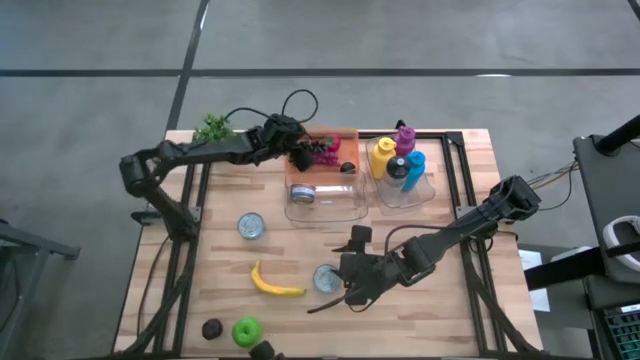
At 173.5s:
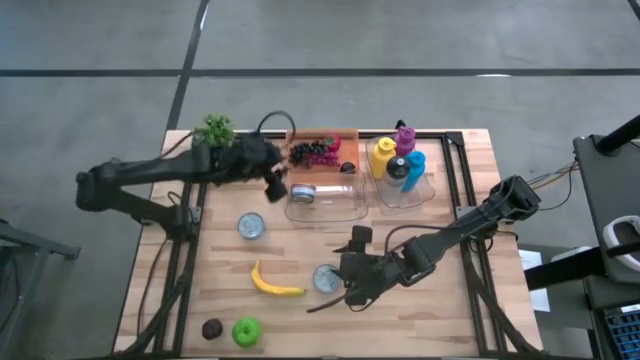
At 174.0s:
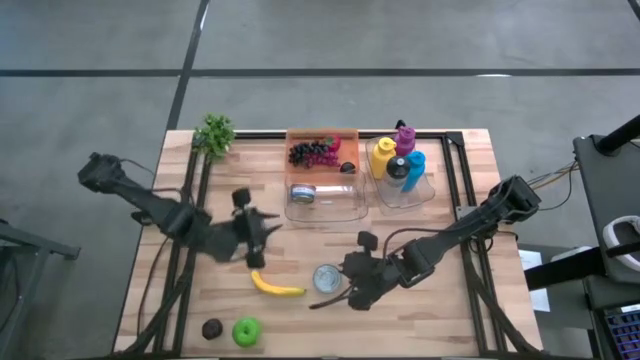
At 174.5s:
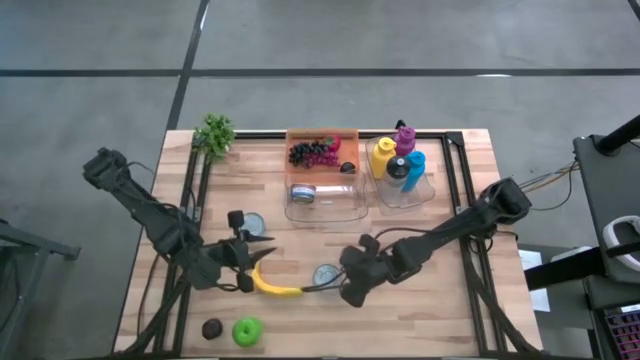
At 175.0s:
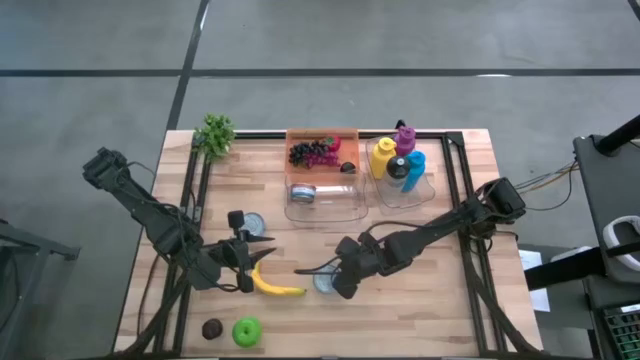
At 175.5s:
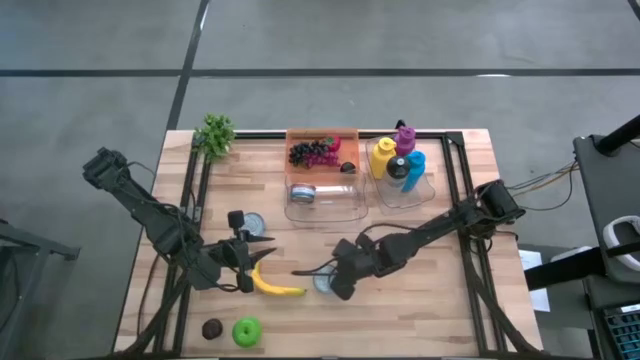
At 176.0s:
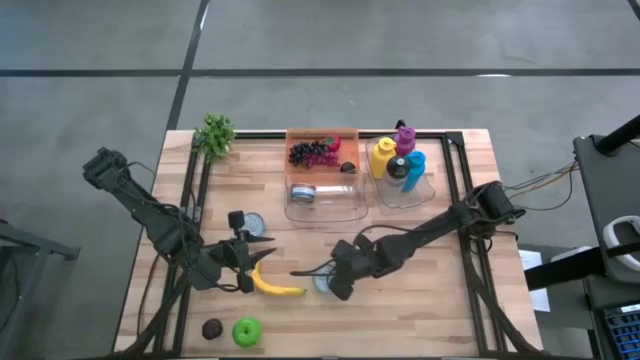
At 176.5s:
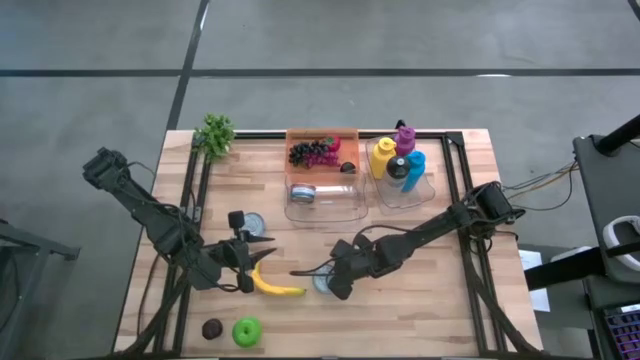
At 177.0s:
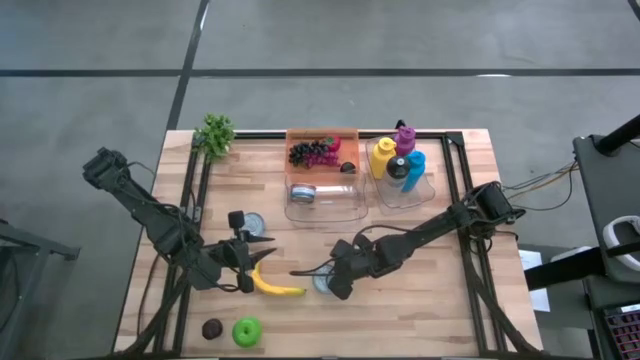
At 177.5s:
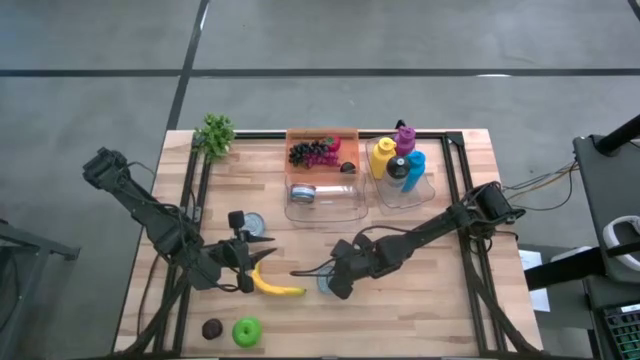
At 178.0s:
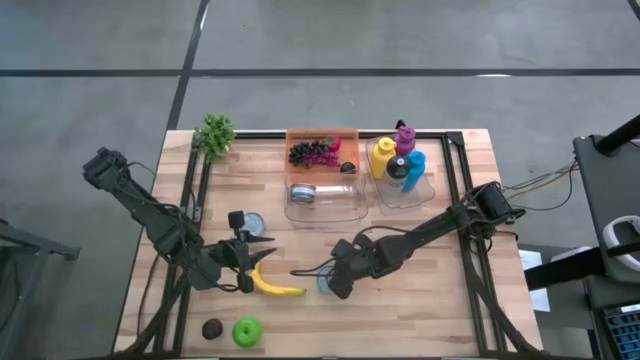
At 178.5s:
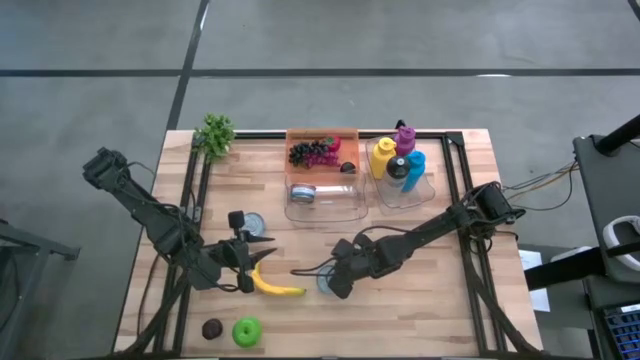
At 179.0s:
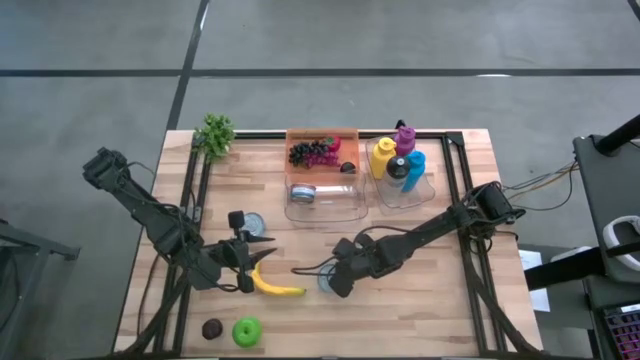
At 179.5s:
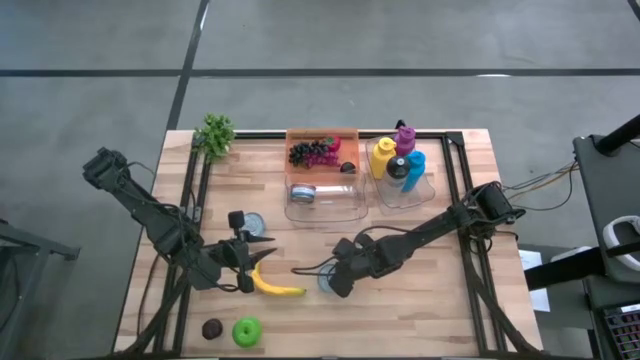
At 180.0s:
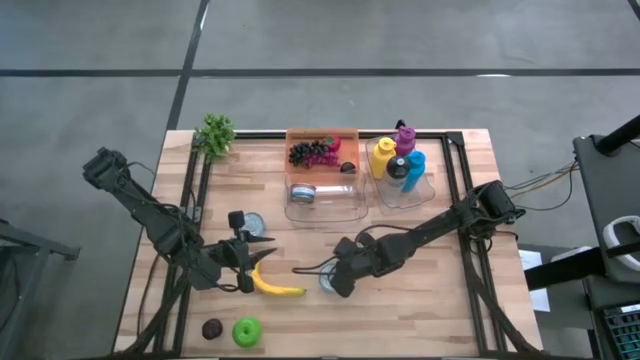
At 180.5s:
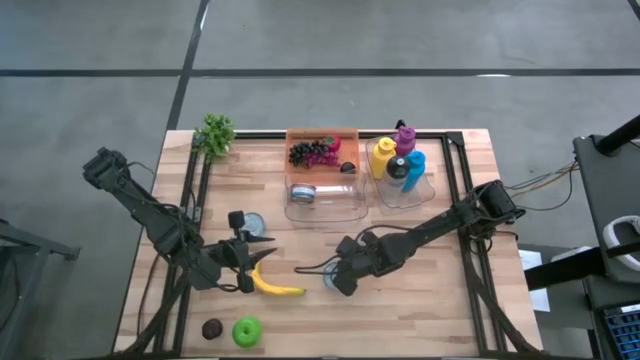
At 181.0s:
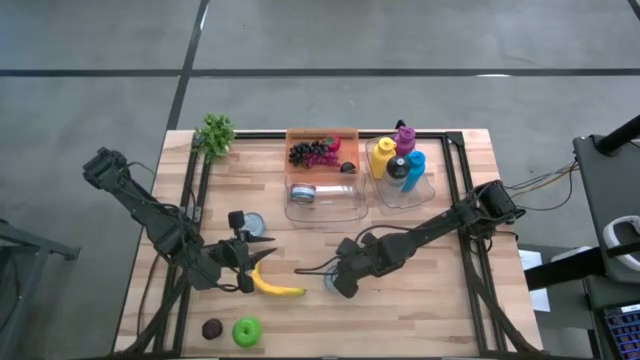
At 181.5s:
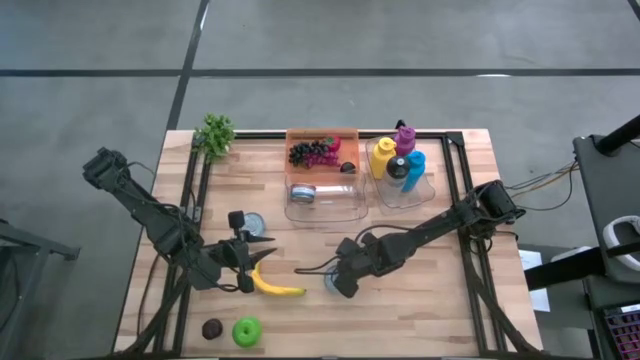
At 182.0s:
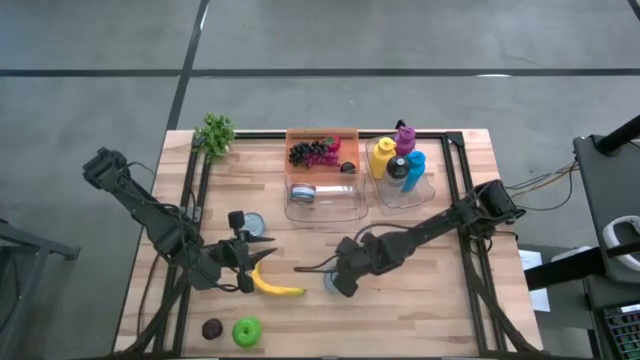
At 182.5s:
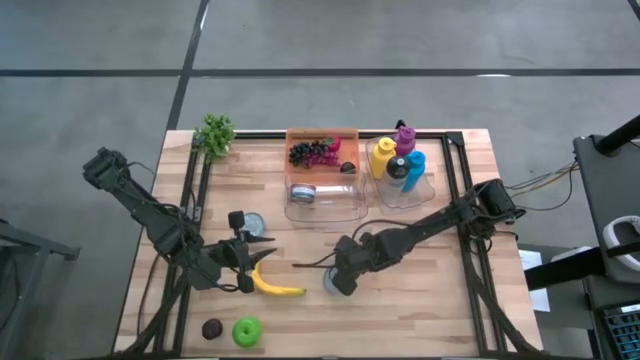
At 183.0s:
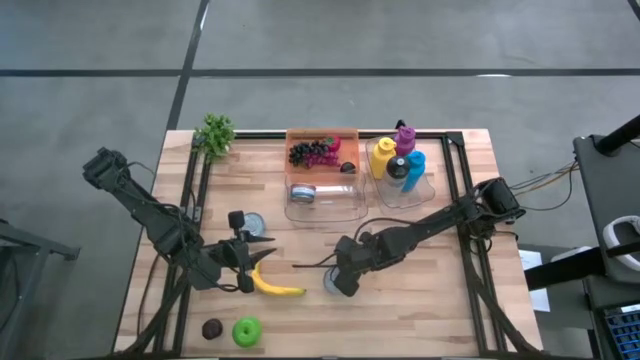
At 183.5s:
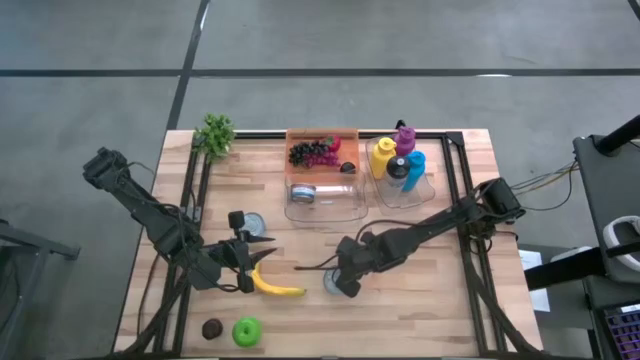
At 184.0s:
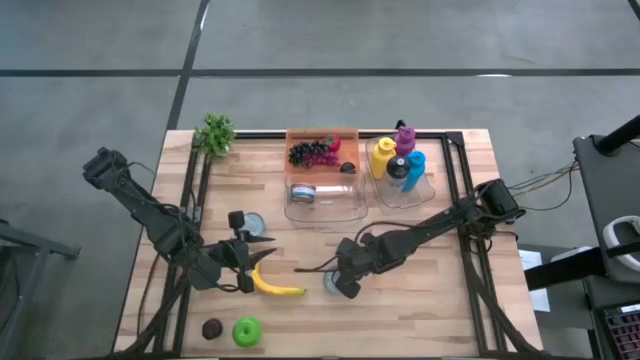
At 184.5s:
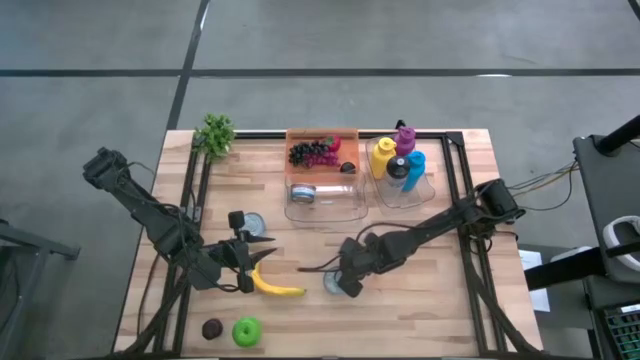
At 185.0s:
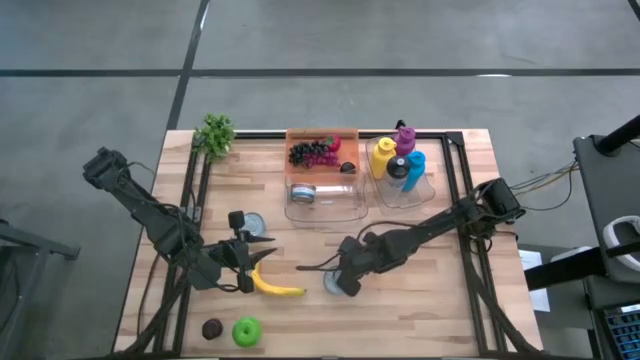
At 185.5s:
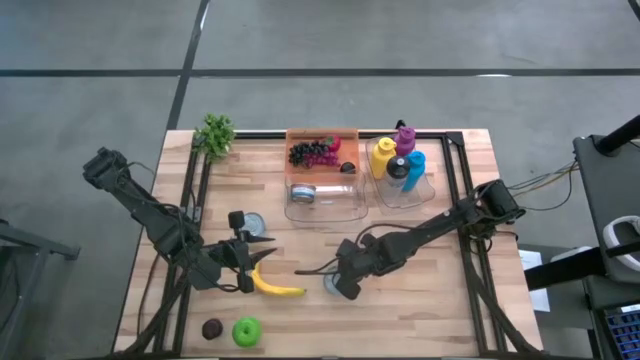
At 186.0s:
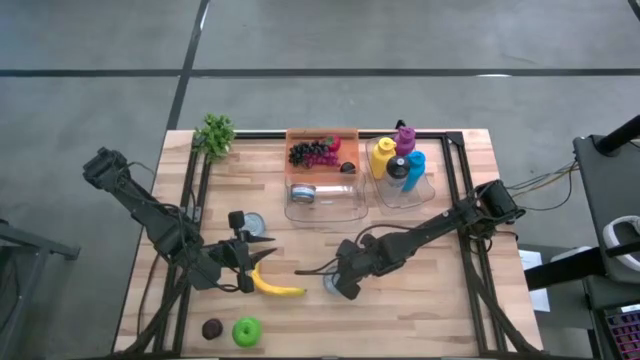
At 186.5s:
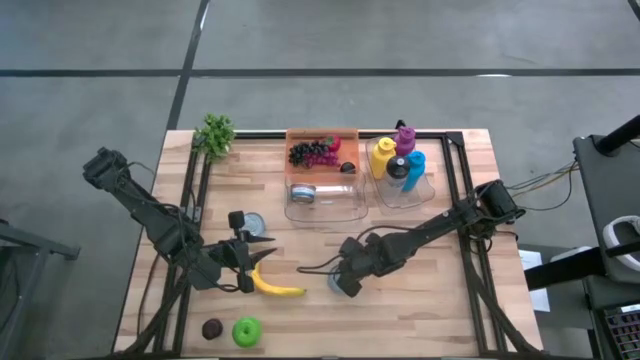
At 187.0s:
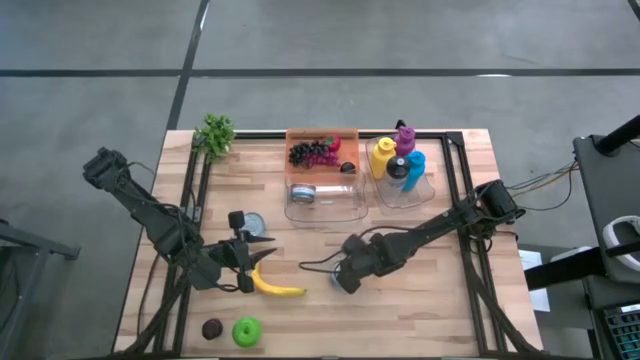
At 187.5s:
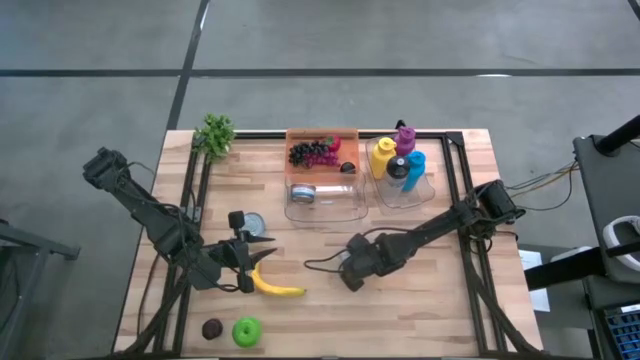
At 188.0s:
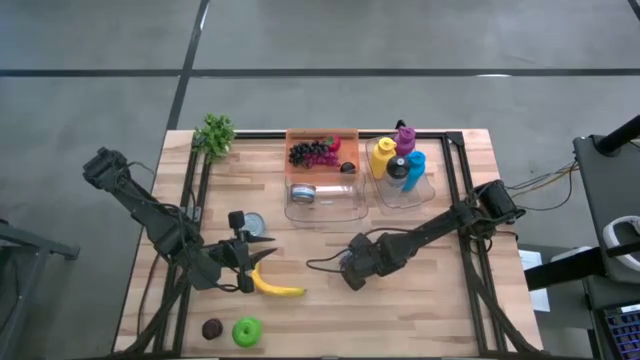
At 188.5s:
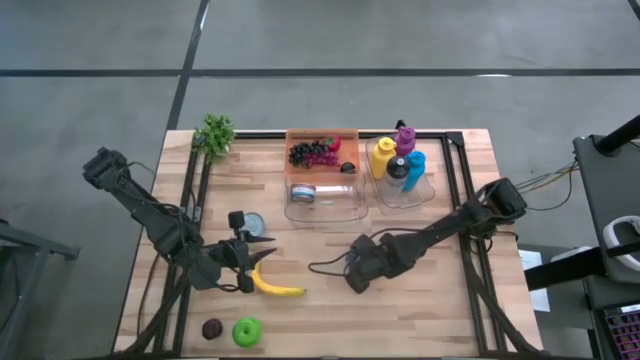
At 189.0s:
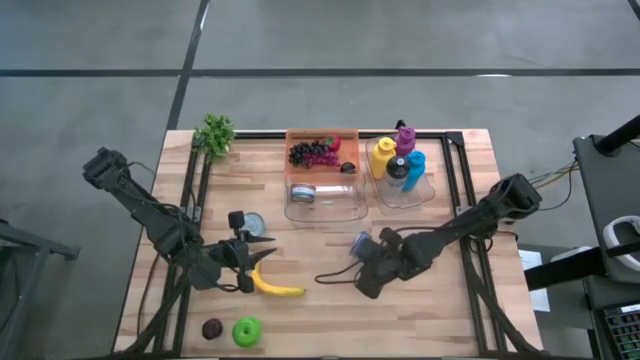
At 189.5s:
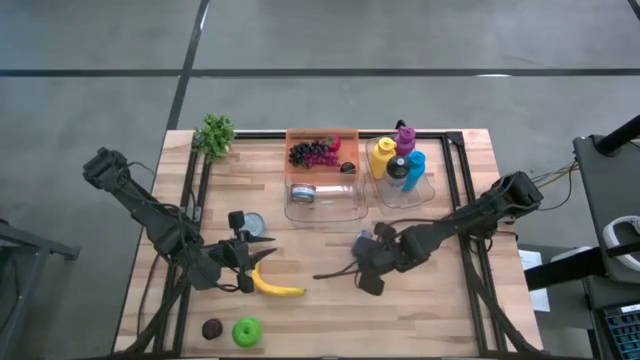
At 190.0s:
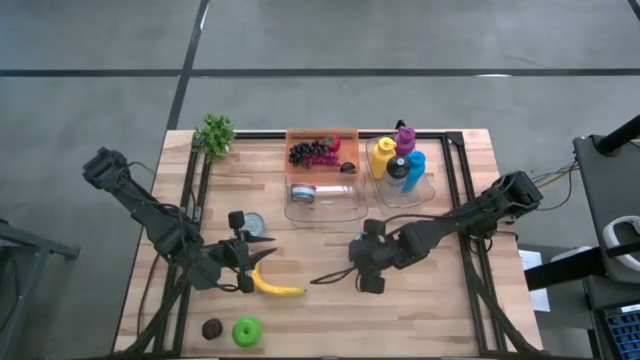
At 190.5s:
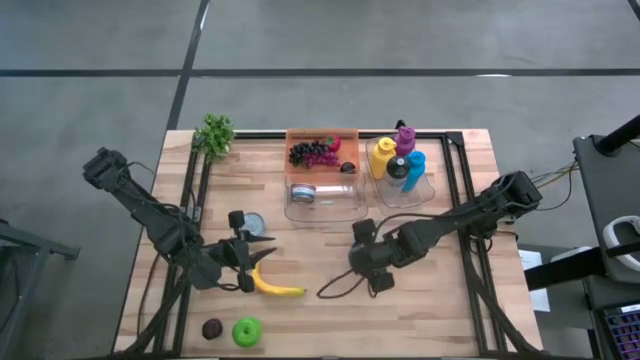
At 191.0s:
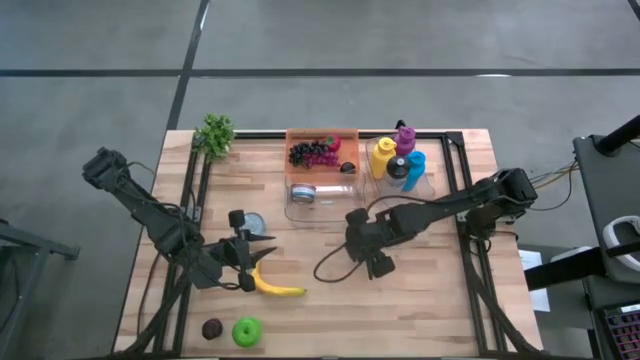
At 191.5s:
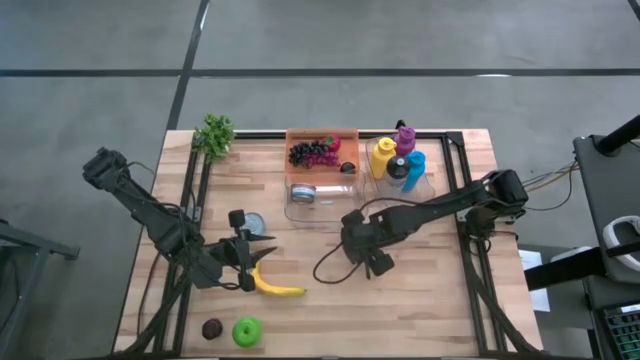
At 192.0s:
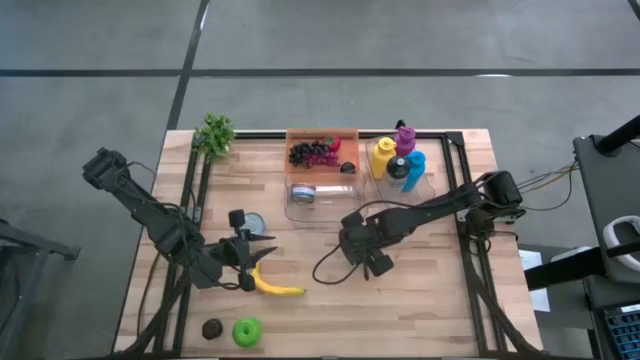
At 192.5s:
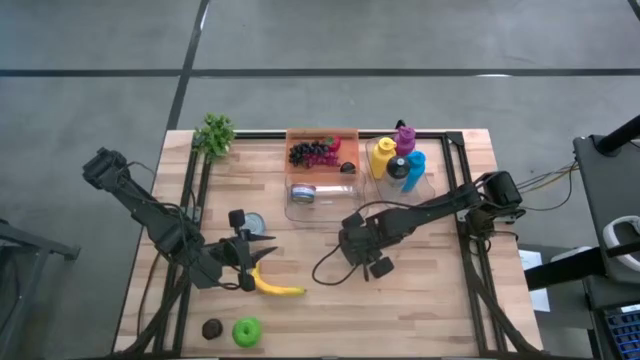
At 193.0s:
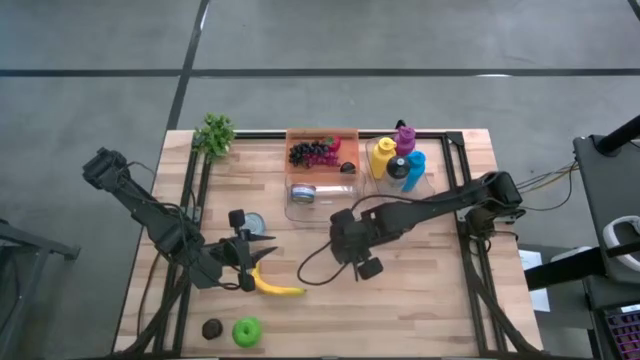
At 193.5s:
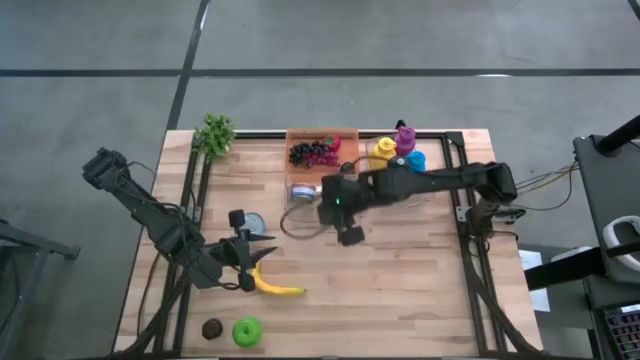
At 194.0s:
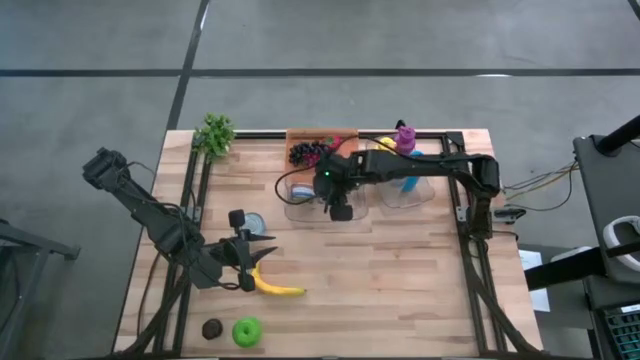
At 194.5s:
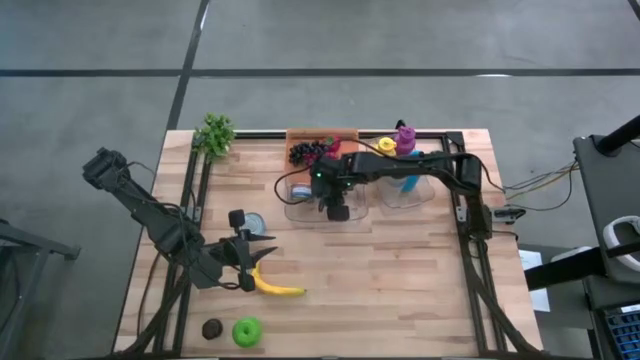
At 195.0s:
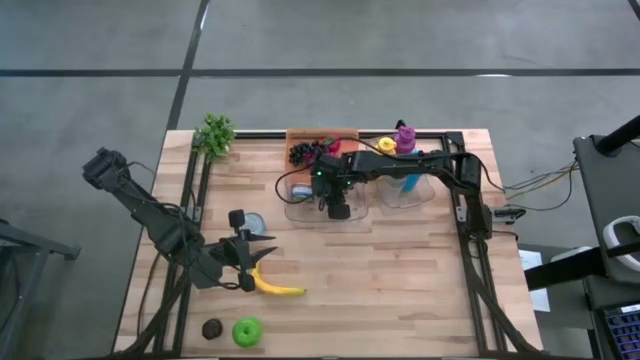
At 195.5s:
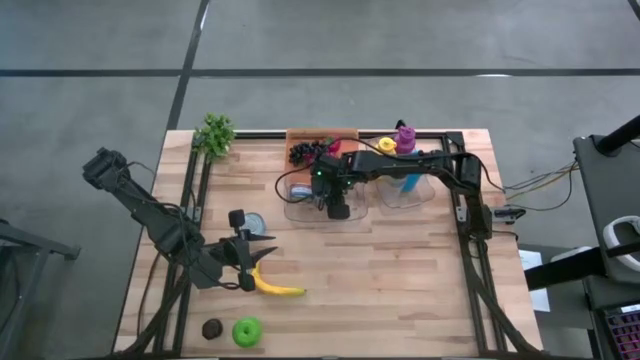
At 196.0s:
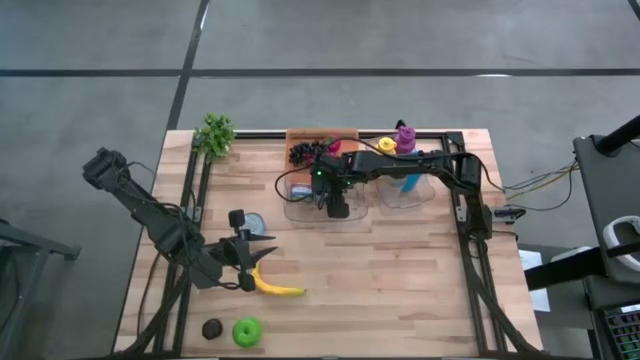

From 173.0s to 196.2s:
Task: Pick & Place Food Item
Put the blue can into the left transparent bin
